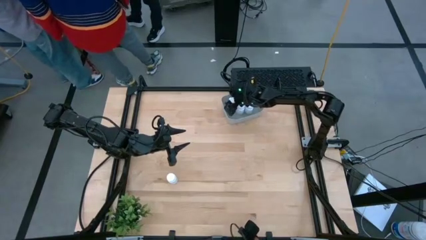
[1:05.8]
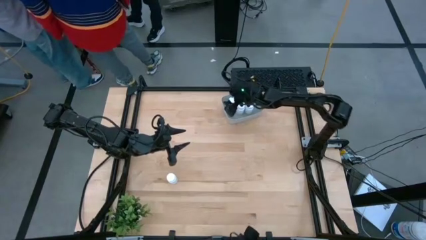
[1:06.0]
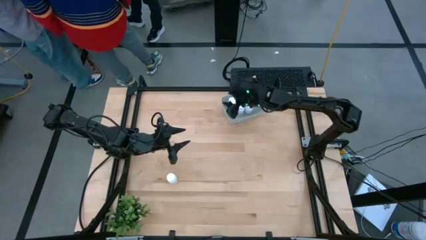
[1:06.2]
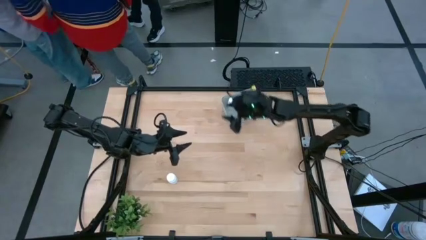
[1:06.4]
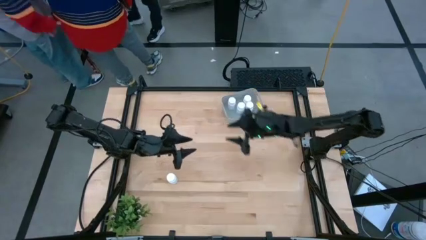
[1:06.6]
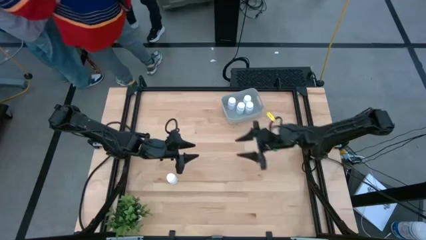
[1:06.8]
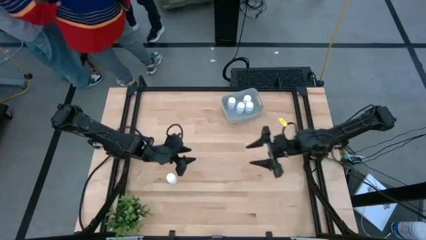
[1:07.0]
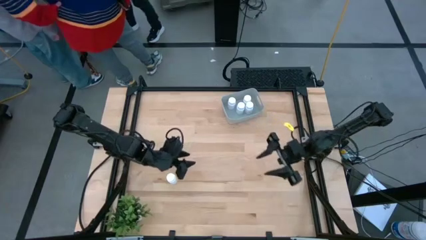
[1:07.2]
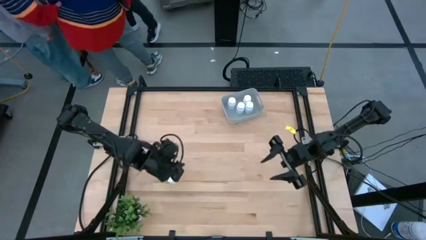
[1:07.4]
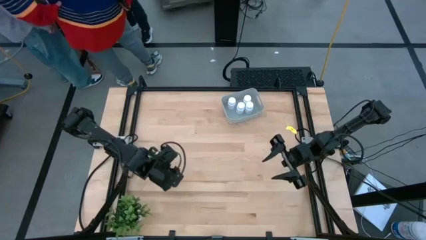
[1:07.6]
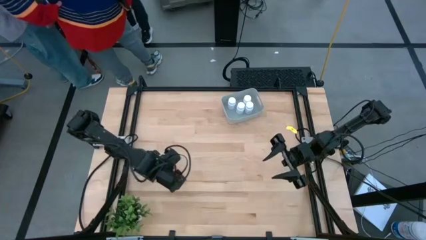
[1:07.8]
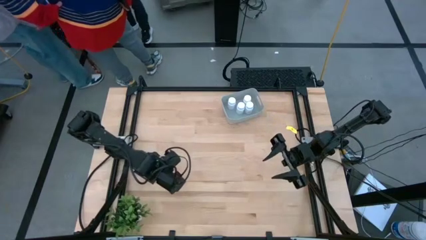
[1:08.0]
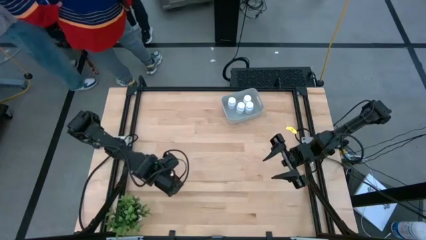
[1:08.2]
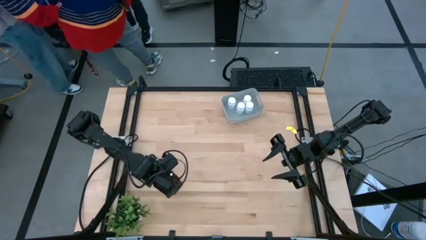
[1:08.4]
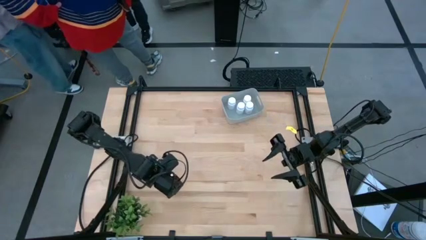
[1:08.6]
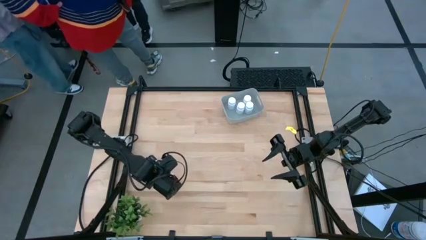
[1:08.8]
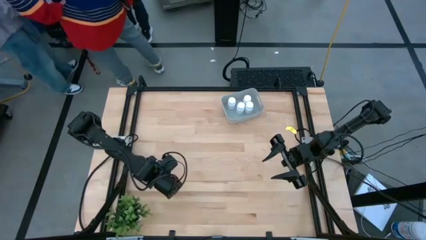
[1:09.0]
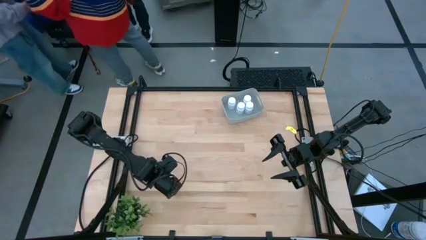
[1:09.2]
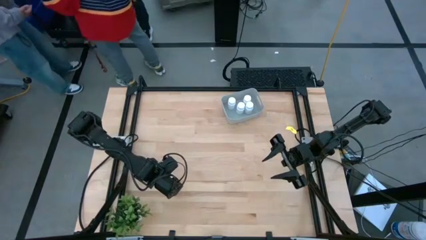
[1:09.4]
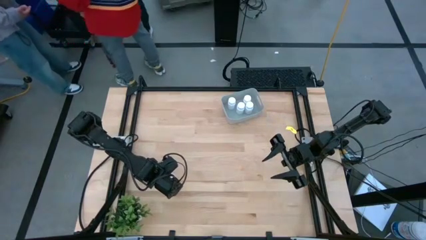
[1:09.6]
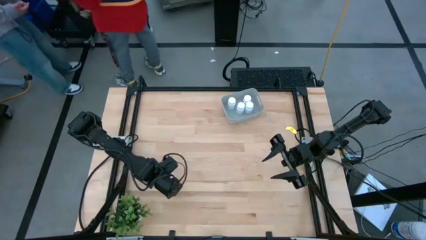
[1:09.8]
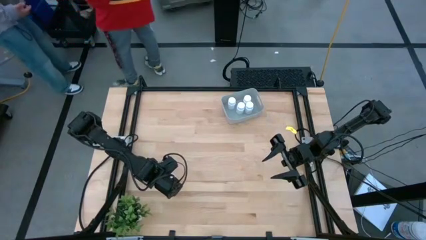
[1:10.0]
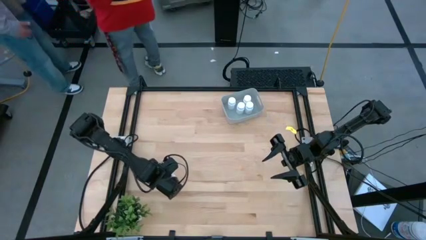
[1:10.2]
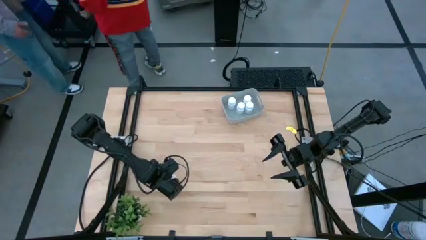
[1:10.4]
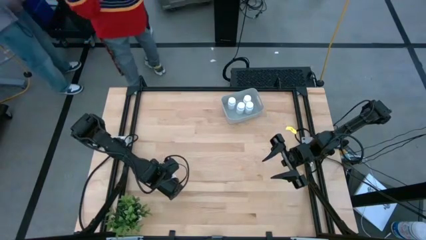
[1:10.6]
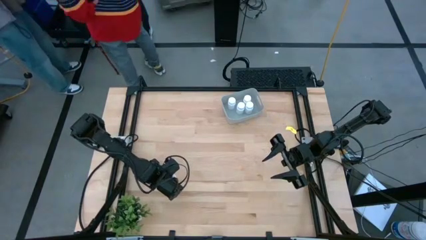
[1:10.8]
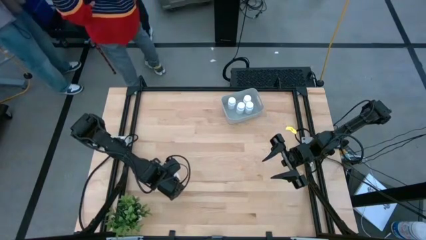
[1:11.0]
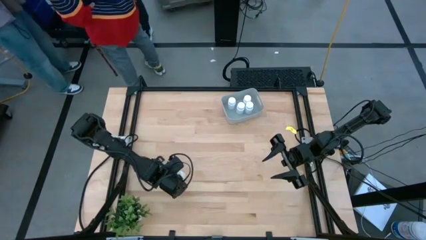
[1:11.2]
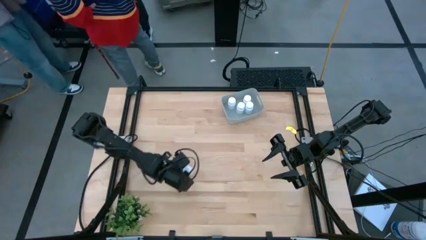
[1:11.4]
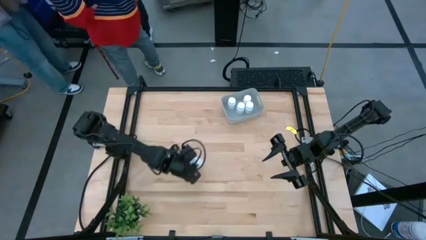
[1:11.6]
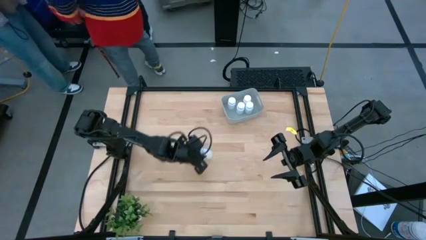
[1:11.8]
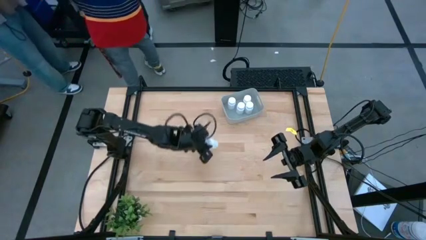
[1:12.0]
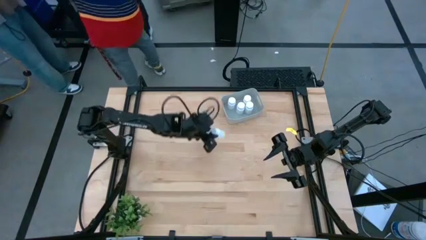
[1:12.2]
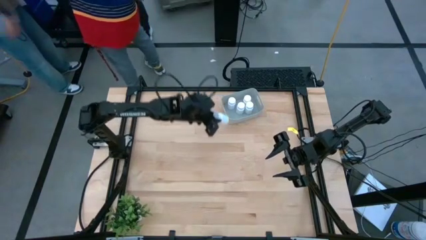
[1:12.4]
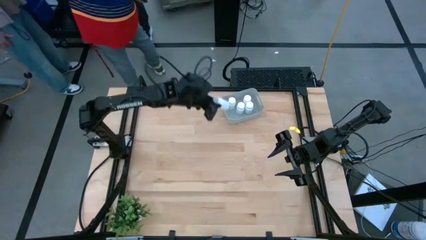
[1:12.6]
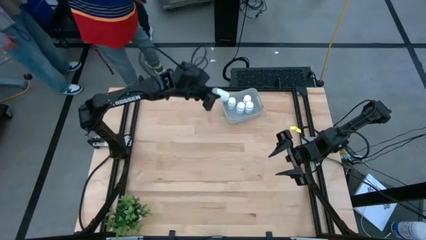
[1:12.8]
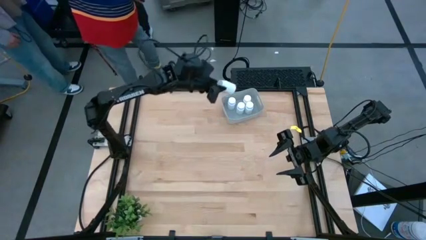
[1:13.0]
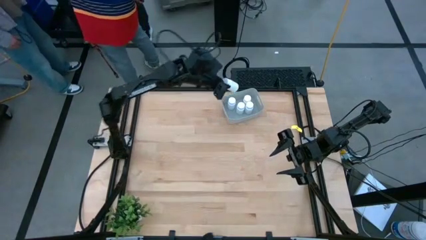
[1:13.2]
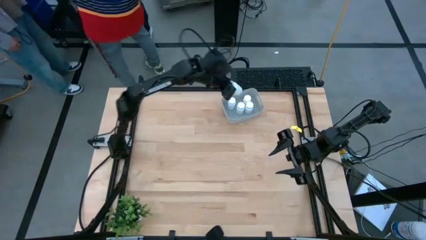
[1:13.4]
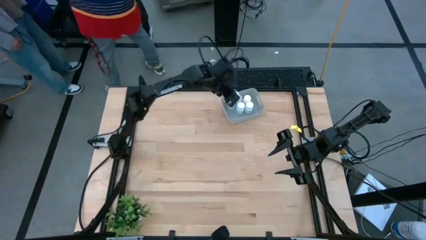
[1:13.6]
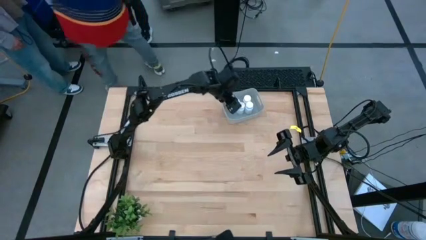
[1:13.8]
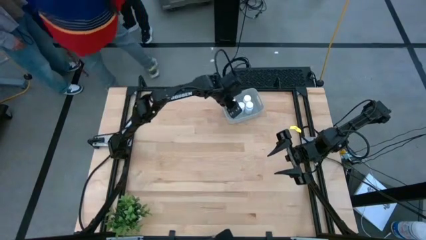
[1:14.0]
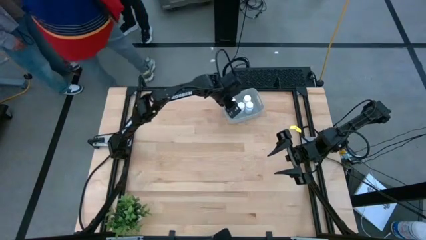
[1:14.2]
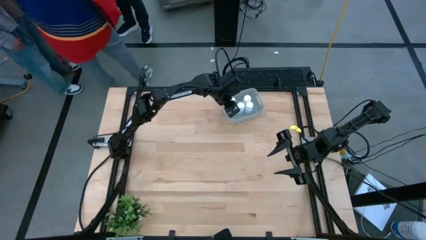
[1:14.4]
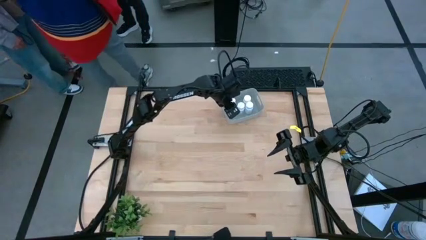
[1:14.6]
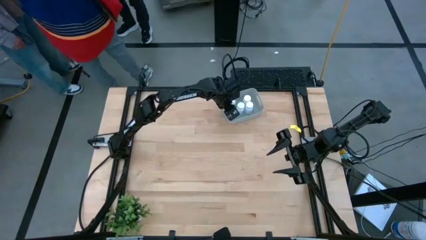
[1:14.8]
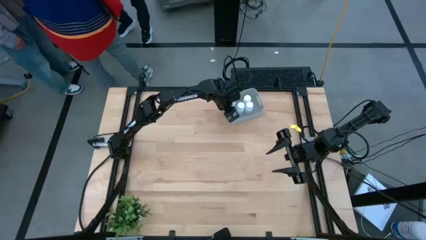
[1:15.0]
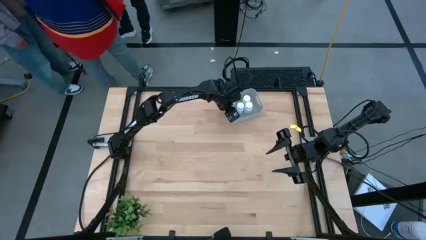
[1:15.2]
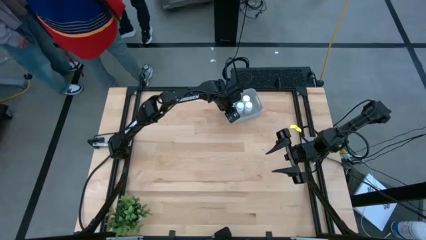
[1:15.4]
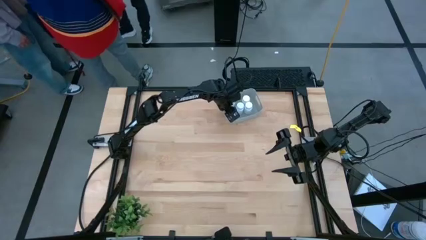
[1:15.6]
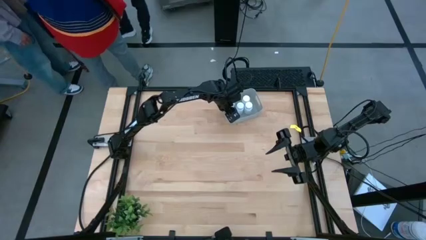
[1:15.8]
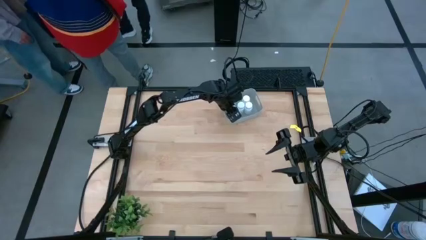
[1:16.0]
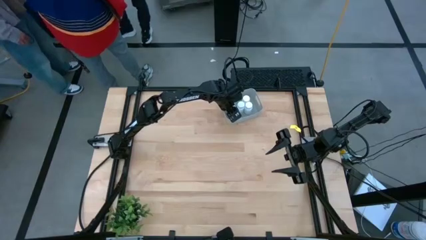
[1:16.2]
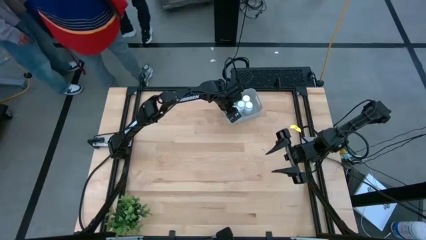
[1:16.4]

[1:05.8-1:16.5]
Task: Pick and place pill bottles into a basket
Put the white medicine bottle into the gray bin

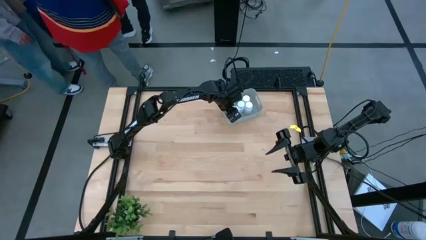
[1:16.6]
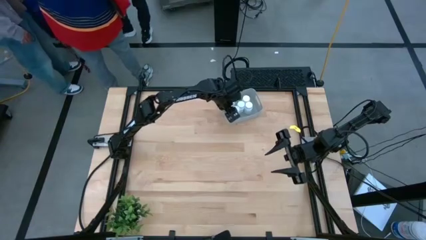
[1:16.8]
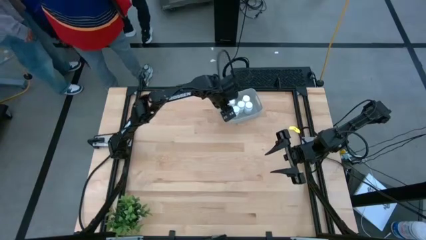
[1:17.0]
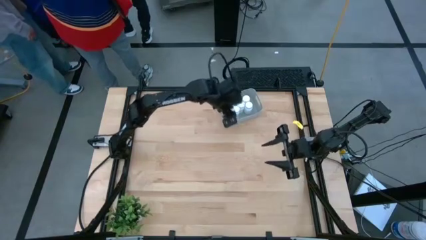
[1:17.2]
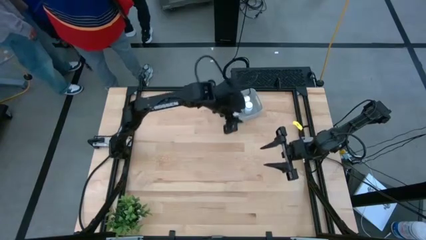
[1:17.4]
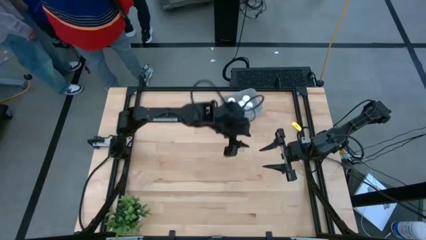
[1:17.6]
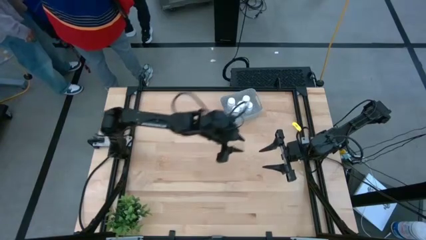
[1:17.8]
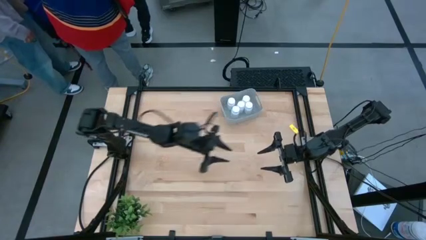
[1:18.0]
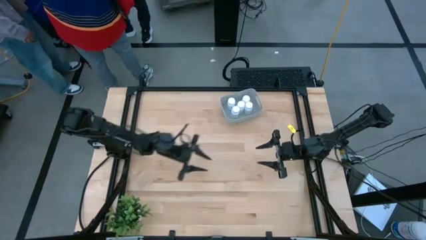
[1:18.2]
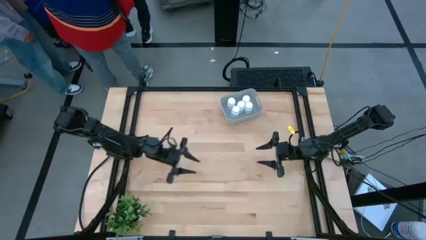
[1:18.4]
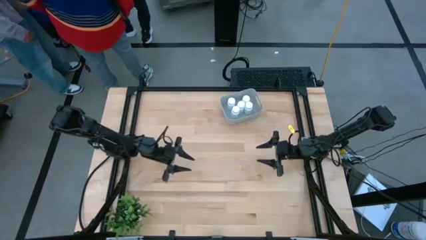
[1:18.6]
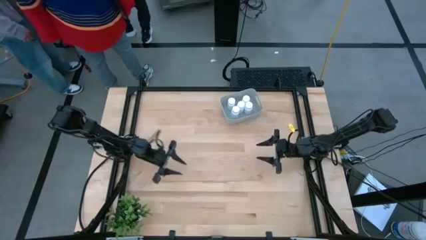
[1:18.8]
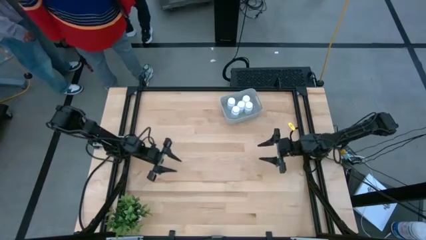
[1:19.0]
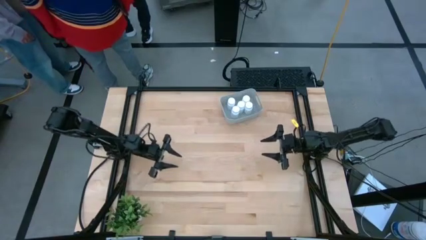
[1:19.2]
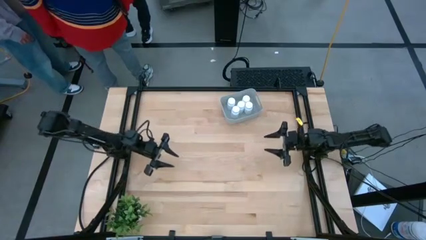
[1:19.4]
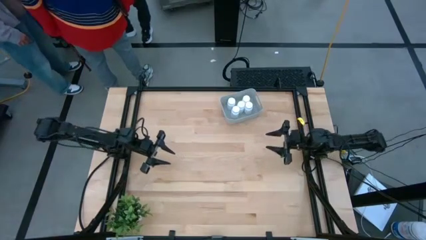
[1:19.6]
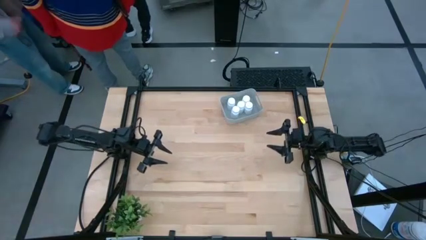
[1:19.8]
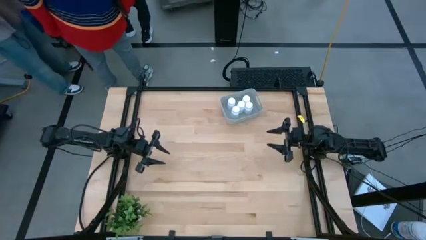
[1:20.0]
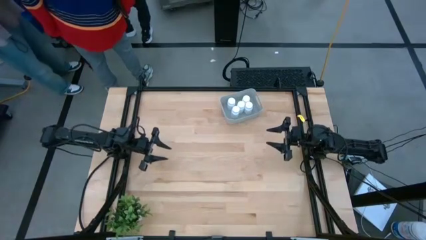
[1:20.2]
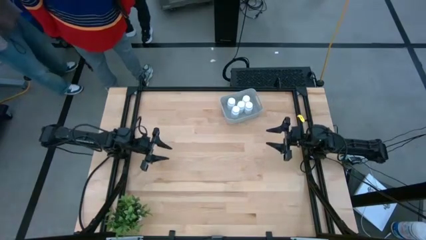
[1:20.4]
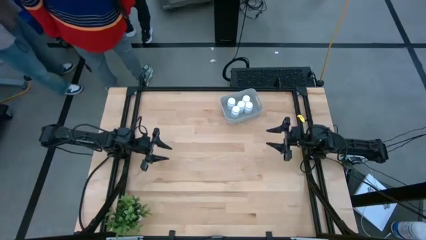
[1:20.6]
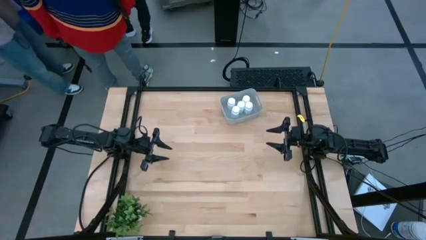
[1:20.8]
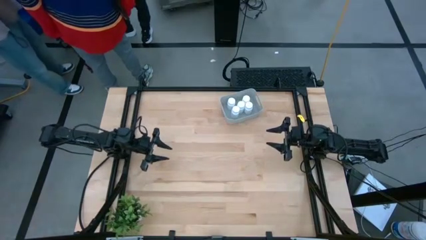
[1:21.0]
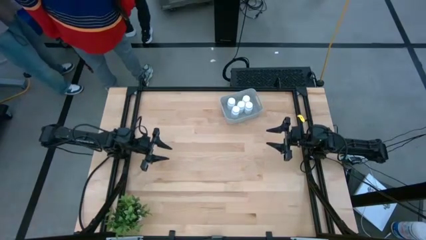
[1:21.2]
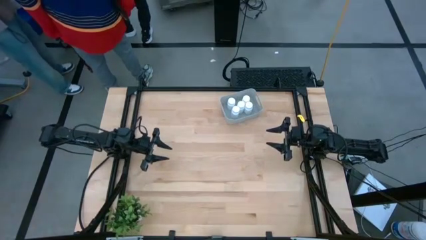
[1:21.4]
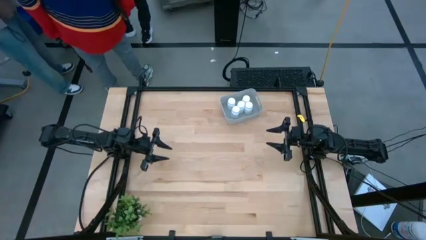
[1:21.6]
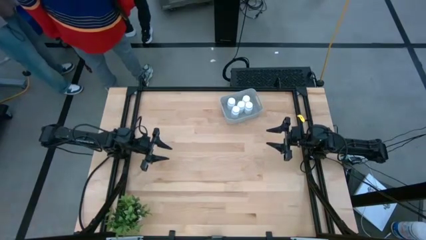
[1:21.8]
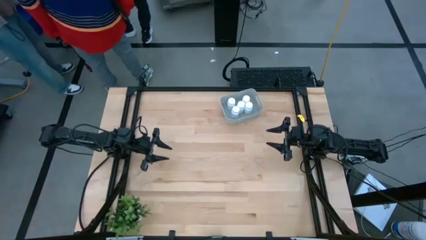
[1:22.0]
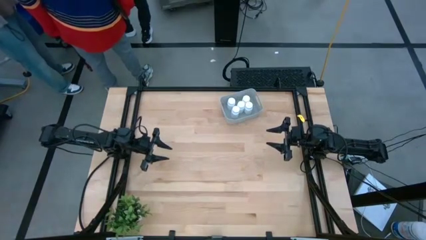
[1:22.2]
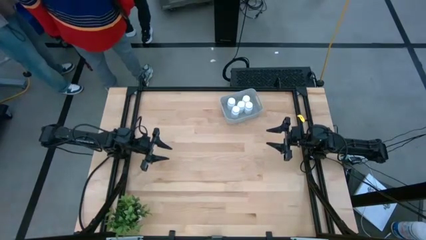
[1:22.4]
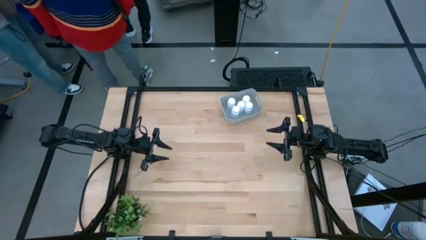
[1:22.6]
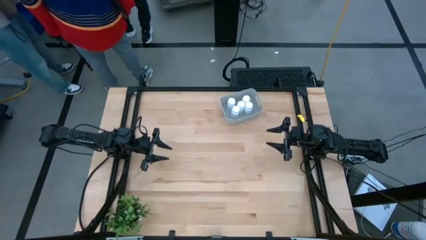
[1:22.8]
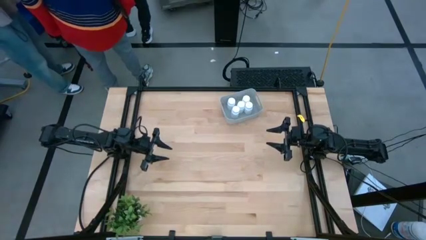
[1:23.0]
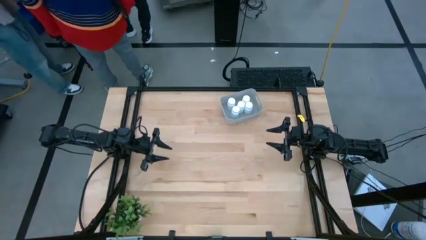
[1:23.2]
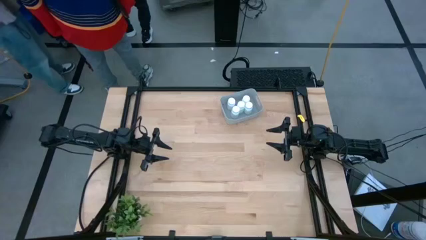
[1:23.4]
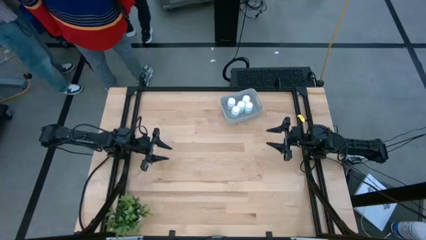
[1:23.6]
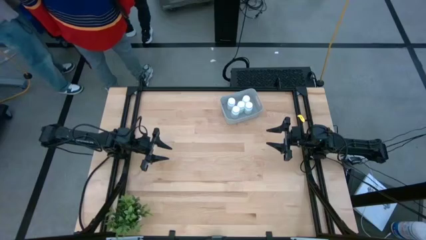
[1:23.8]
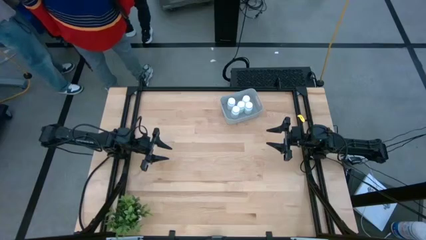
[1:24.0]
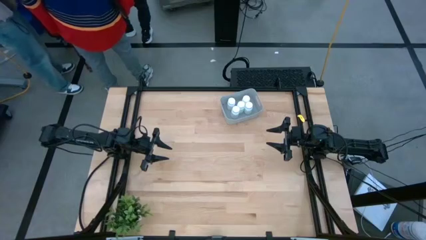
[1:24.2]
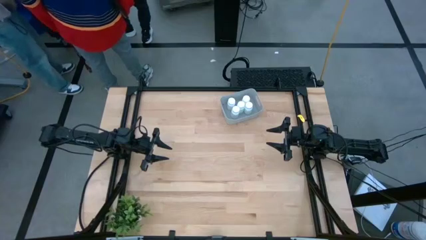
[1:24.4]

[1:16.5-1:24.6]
Return to Home Position
